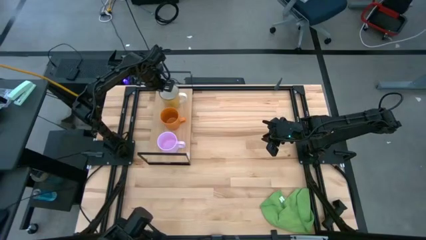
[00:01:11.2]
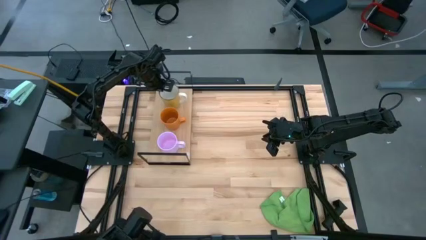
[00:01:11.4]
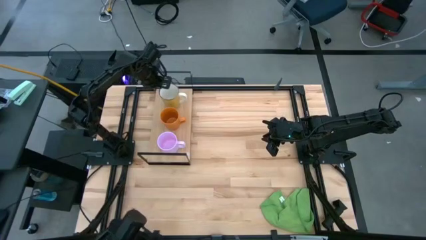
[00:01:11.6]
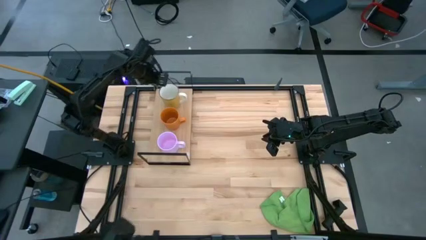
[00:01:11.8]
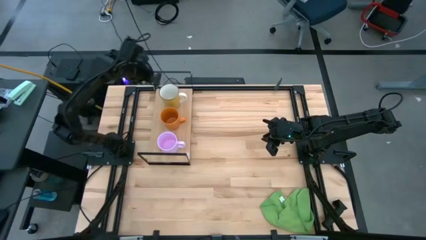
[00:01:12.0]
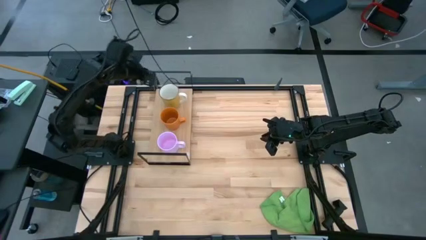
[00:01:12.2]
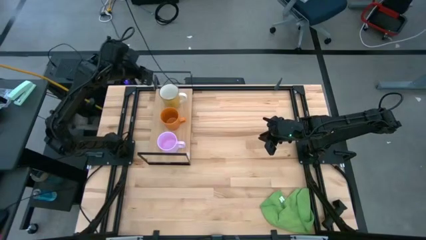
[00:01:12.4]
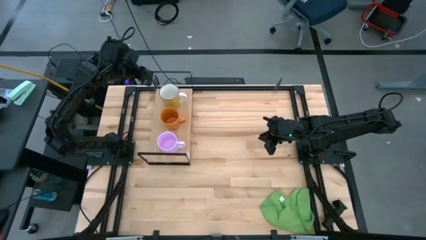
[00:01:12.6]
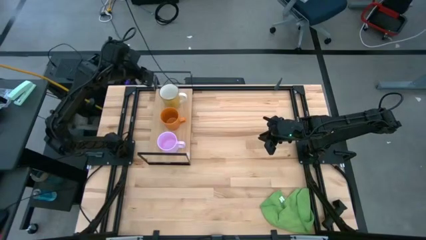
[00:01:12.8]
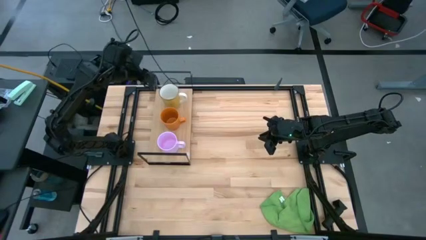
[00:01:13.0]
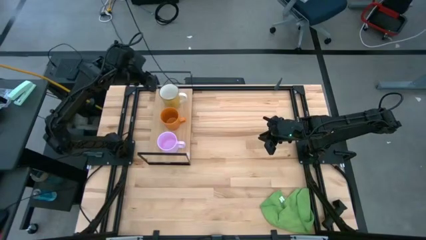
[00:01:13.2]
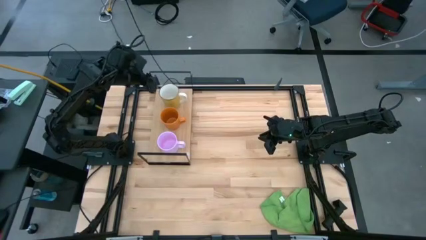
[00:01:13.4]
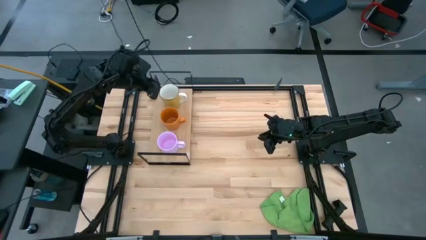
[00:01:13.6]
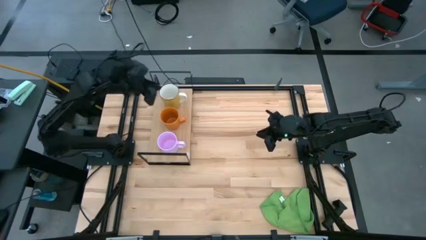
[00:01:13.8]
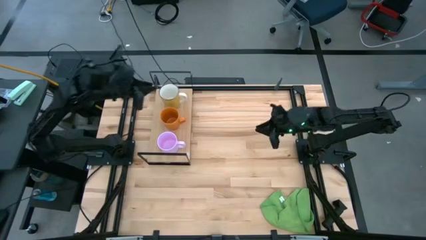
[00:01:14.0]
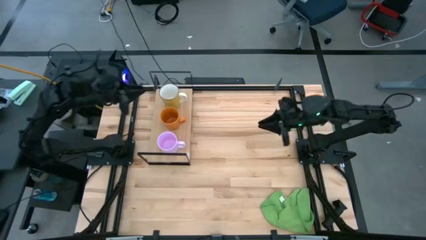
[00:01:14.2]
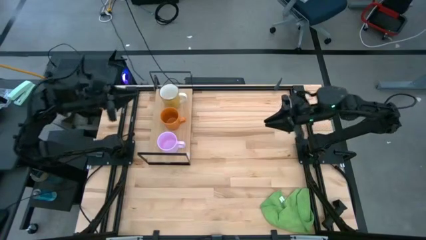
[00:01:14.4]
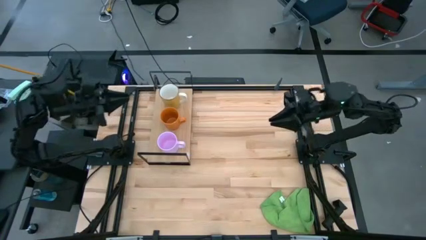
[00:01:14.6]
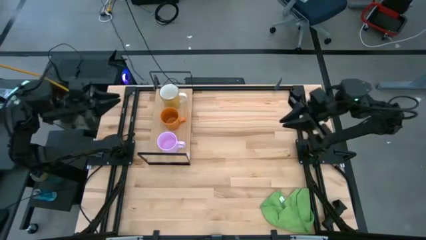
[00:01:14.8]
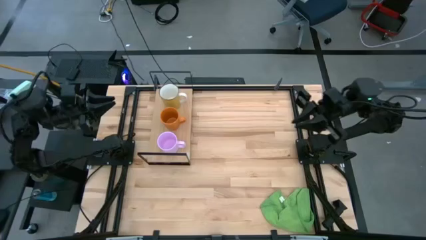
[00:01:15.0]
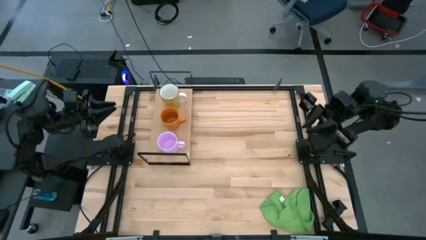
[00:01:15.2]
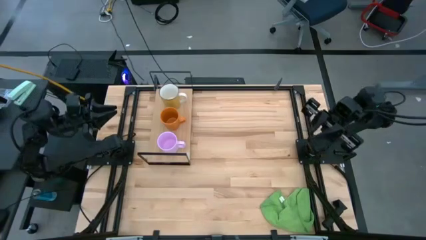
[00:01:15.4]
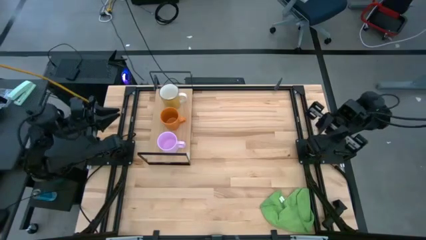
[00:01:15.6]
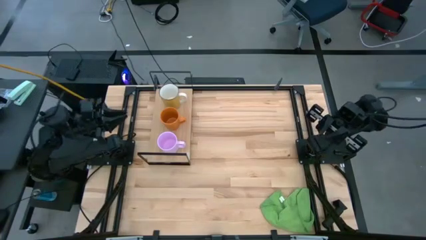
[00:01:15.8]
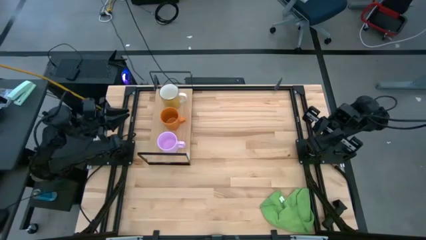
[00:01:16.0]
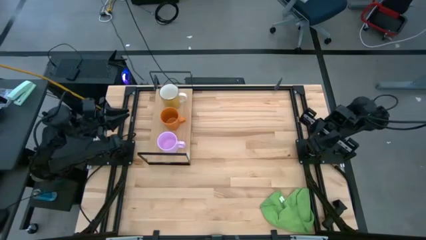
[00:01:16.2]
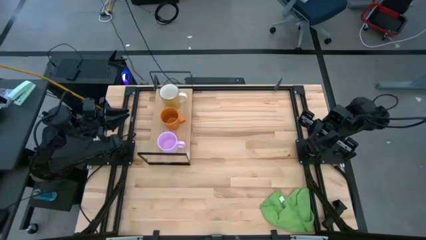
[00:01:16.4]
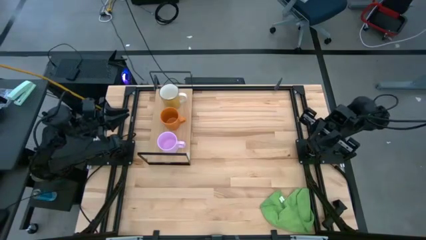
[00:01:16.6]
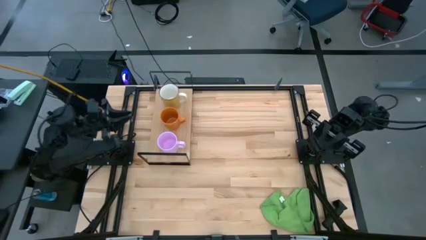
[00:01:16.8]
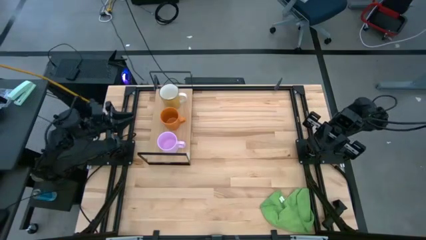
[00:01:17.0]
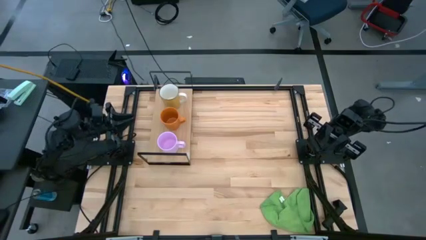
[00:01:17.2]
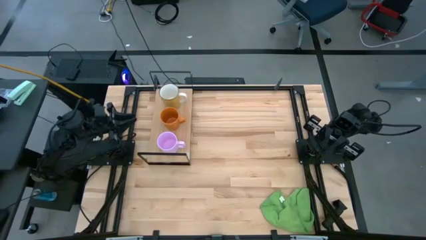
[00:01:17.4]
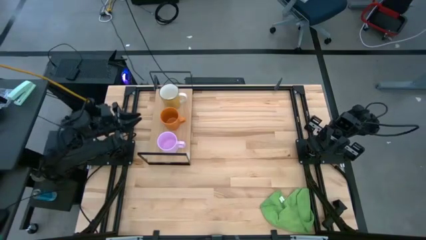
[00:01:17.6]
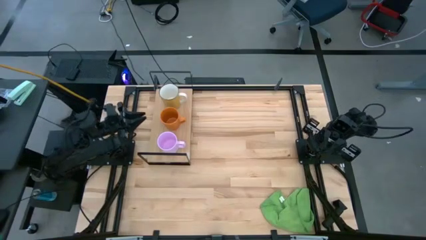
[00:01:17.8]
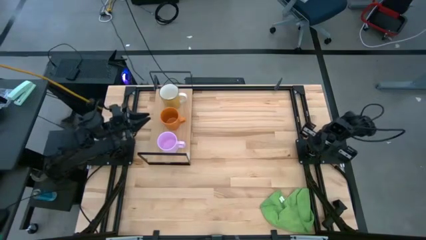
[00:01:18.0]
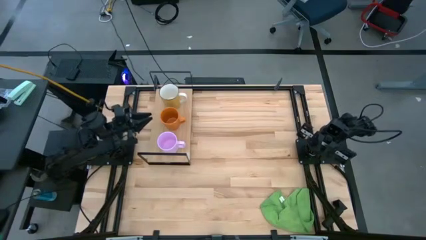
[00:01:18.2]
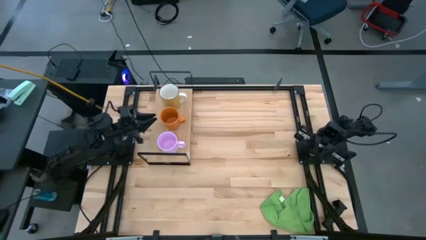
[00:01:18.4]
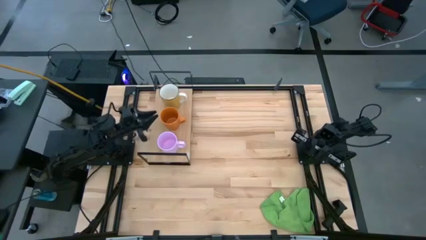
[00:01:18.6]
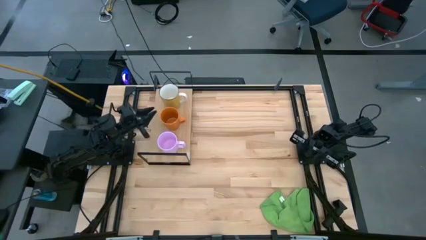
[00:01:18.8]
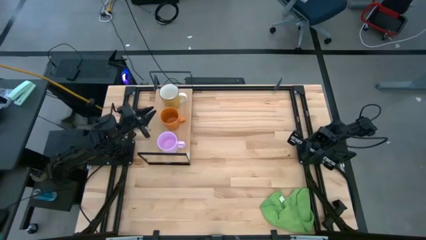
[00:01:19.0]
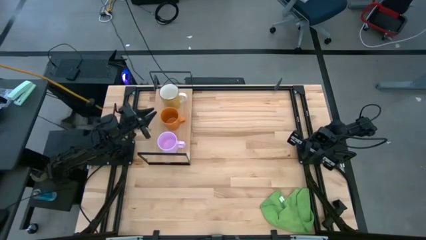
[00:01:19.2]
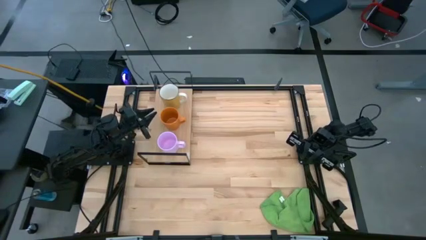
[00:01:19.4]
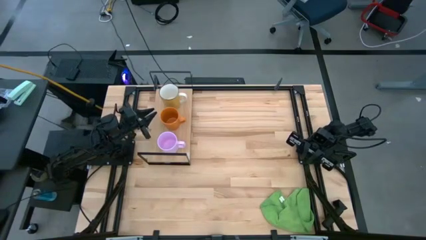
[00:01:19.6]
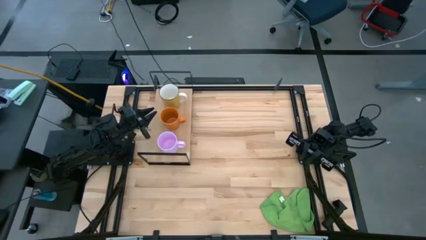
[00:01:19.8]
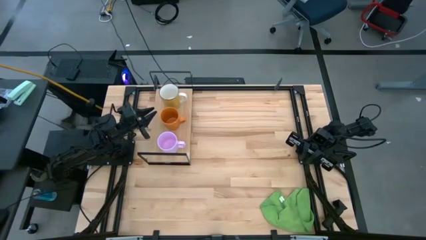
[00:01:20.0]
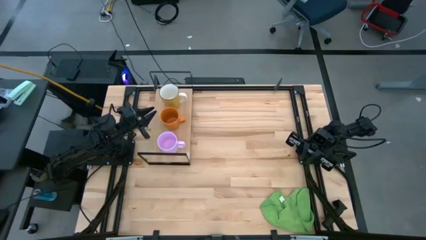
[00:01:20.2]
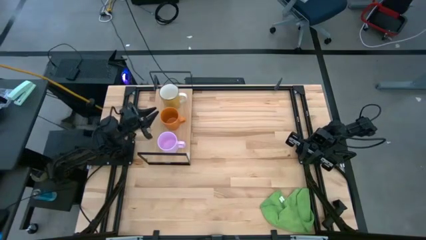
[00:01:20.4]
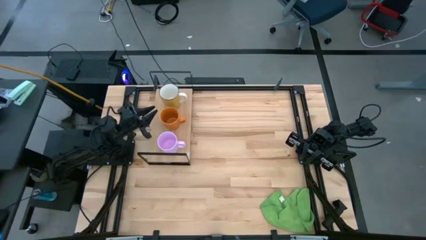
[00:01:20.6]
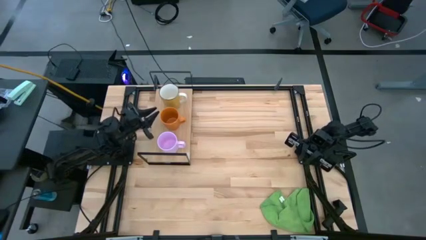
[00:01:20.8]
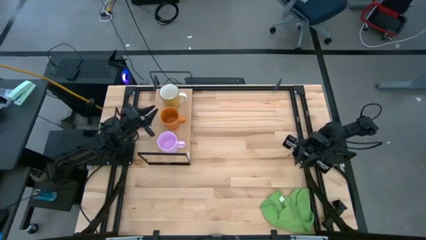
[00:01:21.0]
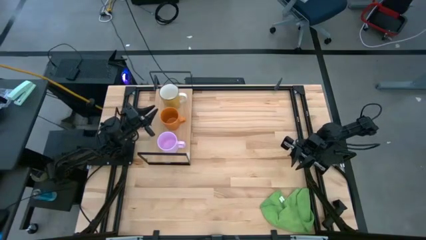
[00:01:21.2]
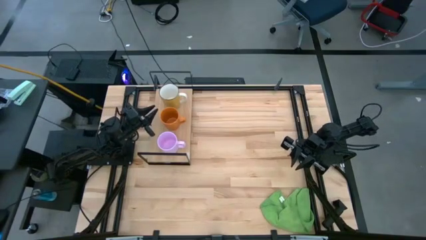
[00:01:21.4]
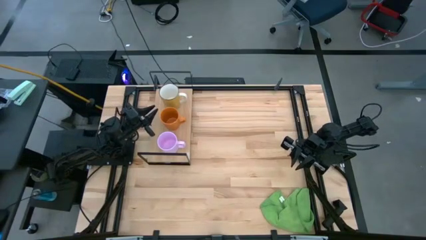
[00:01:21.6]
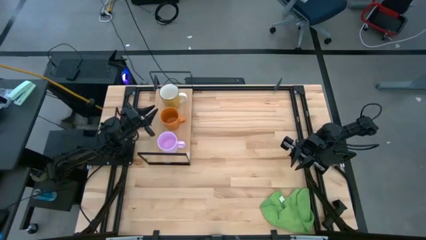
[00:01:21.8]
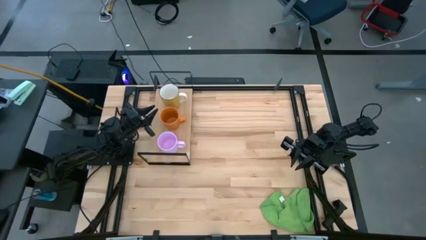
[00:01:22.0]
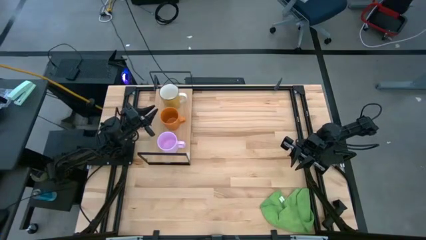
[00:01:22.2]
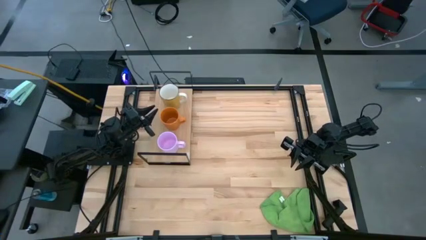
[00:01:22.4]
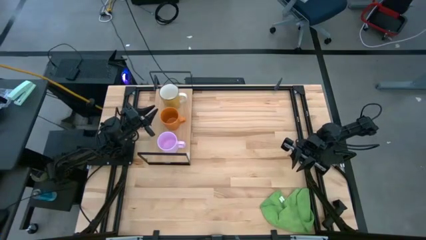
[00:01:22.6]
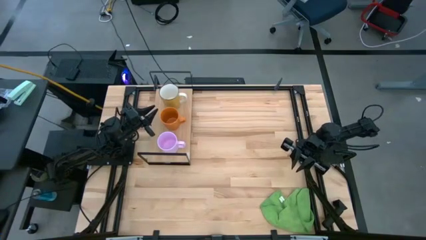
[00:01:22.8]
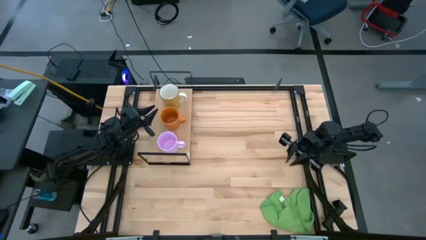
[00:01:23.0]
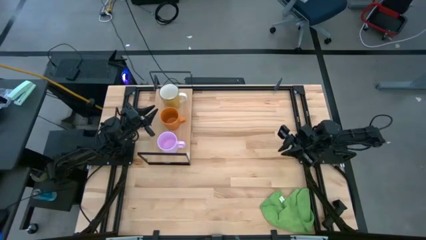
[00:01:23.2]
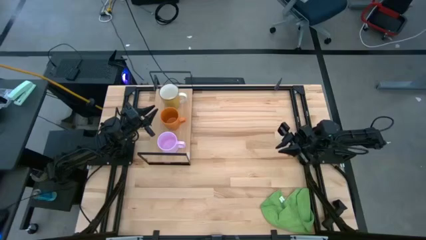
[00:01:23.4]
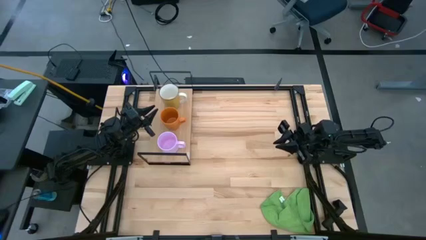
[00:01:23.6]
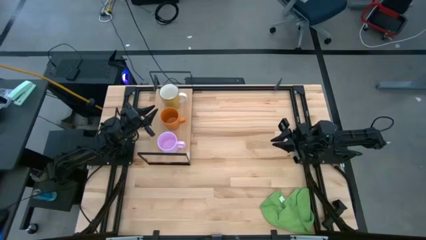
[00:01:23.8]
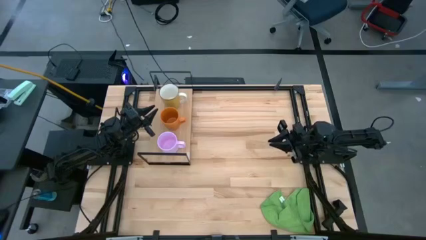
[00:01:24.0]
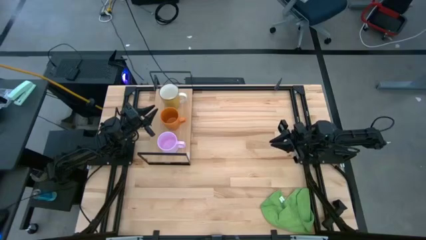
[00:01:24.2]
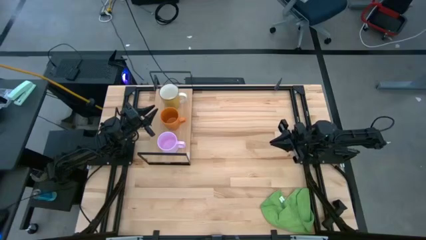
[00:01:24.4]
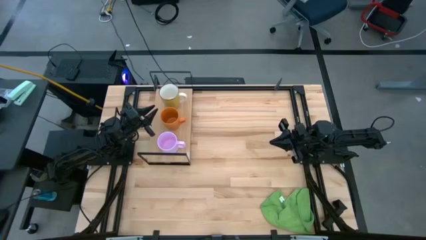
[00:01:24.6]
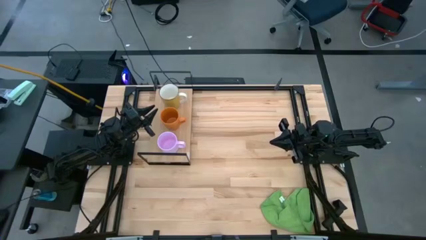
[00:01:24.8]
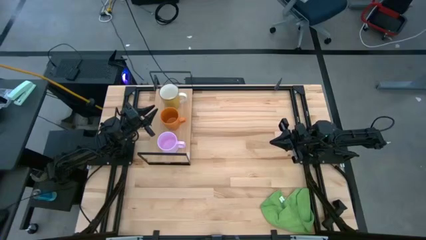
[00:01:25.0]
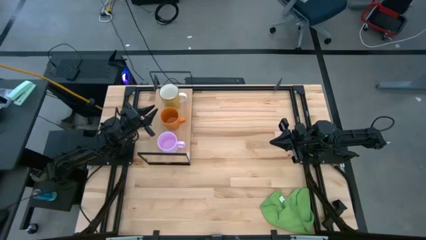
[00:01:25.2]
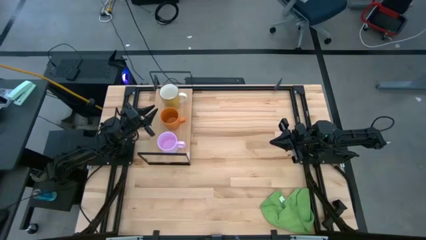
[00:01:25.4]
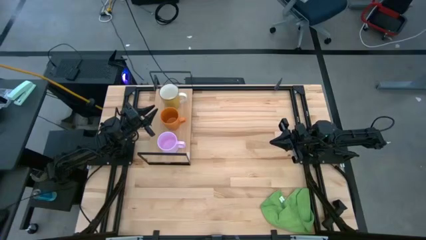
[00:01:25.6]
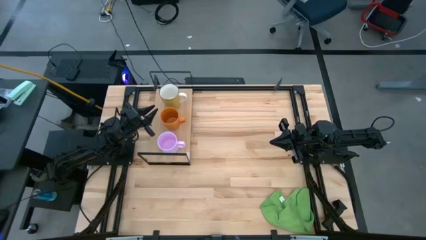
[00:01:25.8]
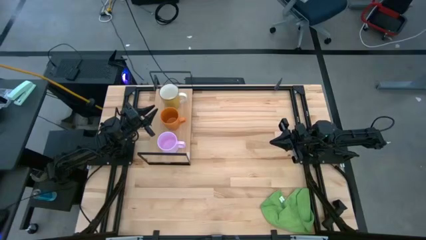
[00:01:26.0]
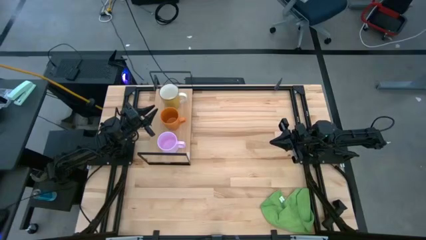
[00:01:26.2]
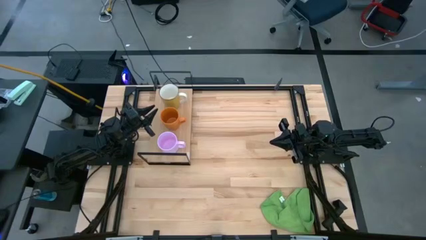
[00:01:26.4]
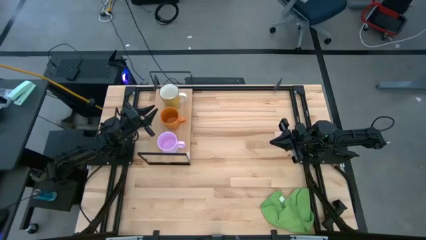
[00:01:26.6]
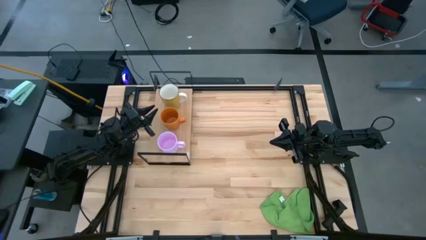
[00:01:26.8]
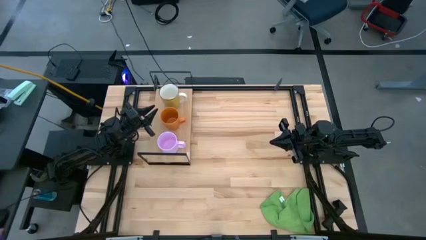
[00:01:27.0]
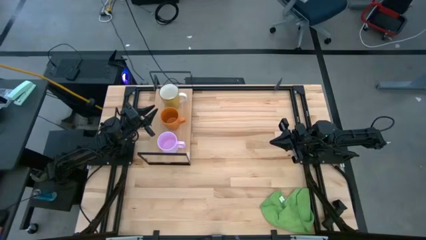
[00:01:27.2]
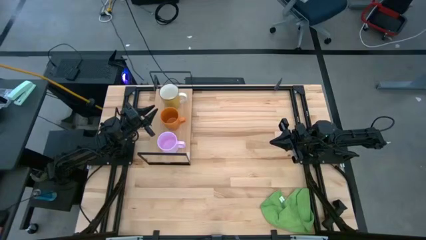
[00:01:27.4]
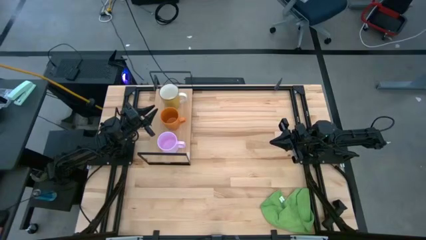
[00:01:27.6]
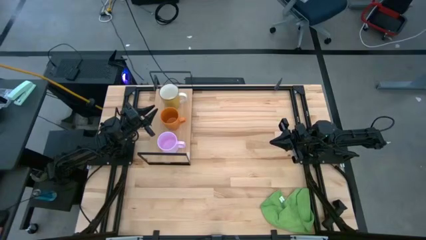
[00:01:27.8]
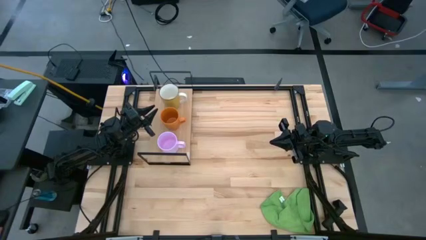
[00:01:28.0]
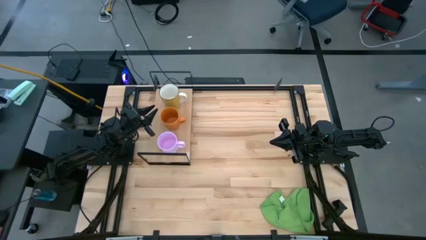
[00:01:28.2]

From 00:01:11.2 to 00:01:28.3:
Task: Stack small to large cups/mugs on shelf
Return to Home Position
